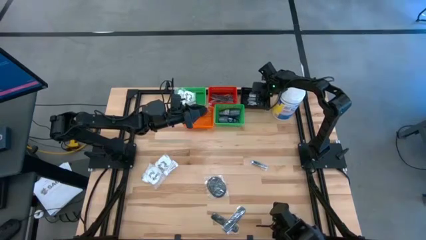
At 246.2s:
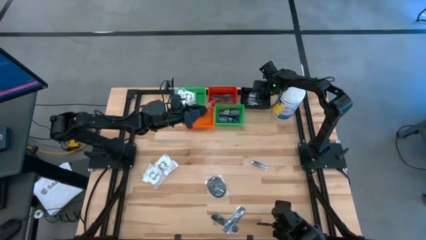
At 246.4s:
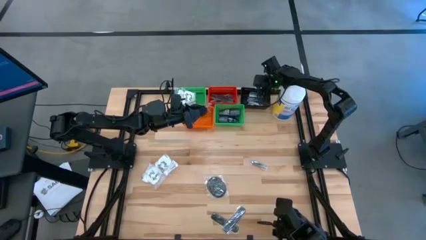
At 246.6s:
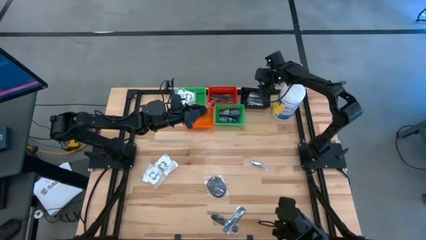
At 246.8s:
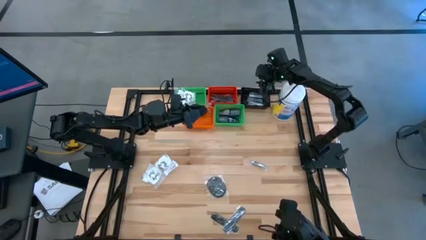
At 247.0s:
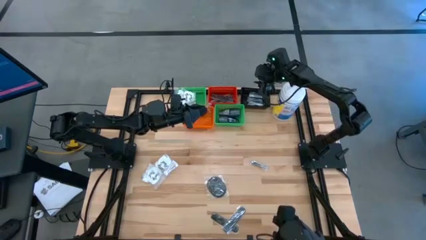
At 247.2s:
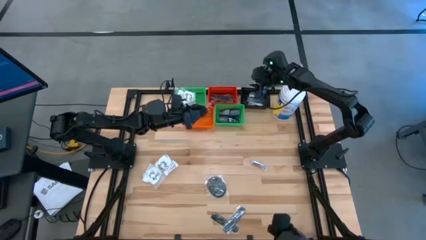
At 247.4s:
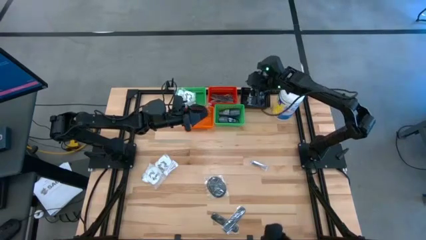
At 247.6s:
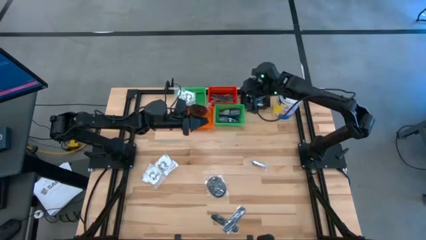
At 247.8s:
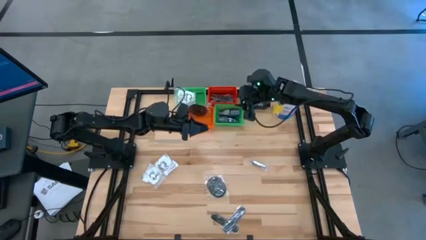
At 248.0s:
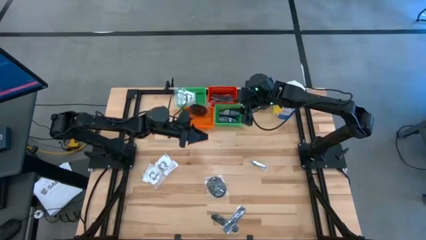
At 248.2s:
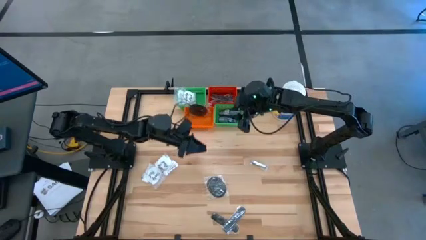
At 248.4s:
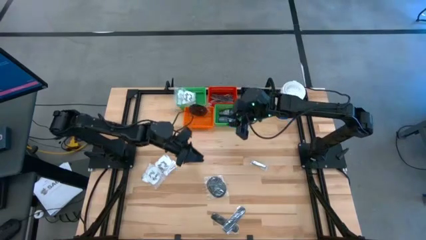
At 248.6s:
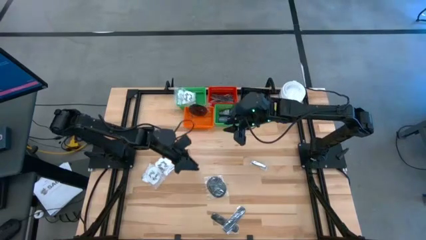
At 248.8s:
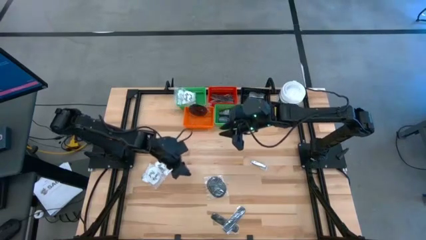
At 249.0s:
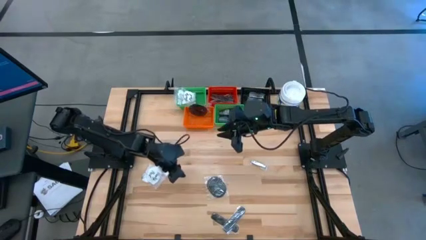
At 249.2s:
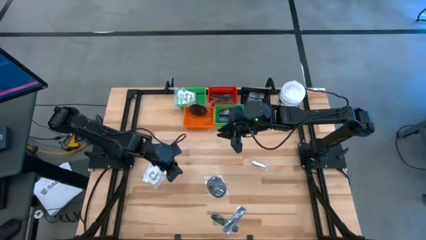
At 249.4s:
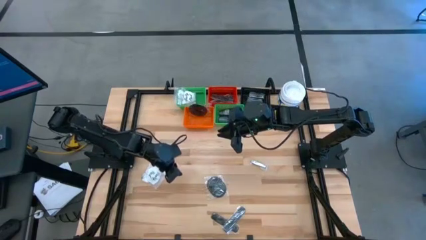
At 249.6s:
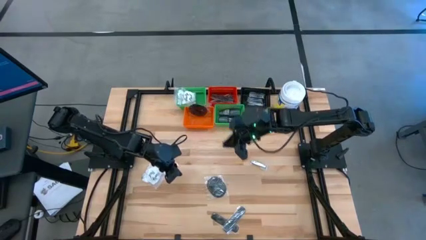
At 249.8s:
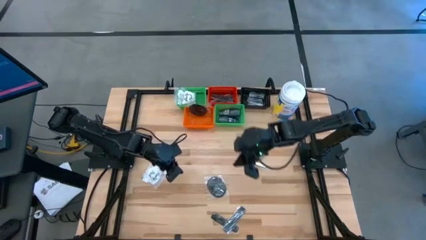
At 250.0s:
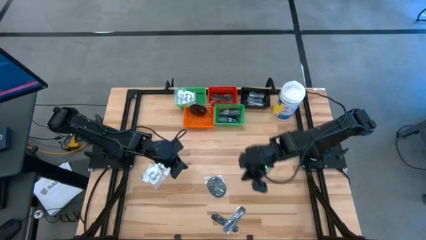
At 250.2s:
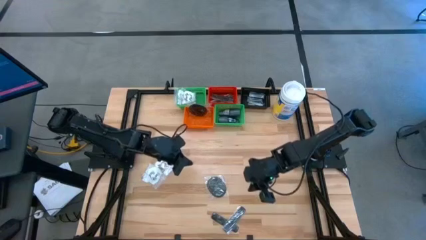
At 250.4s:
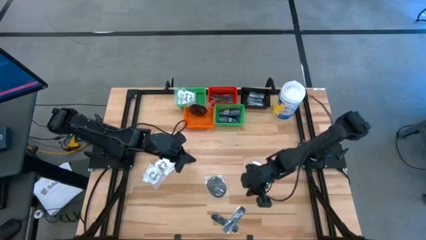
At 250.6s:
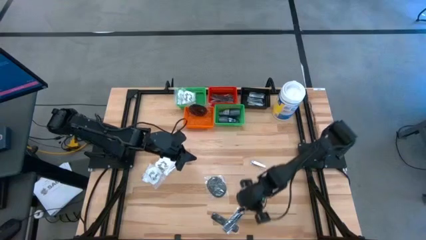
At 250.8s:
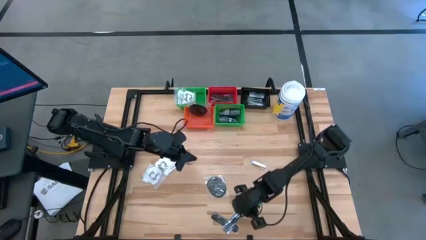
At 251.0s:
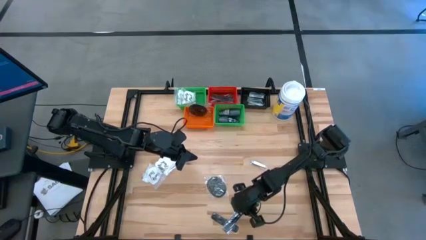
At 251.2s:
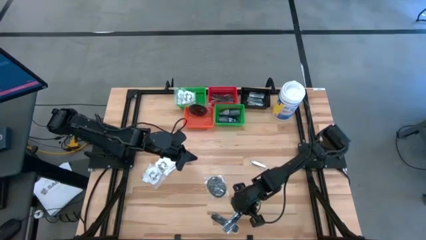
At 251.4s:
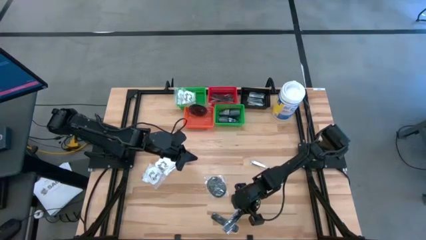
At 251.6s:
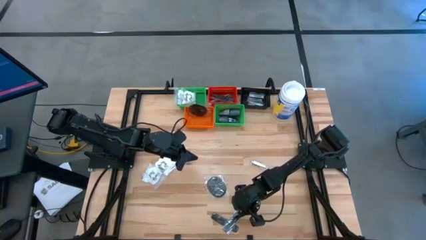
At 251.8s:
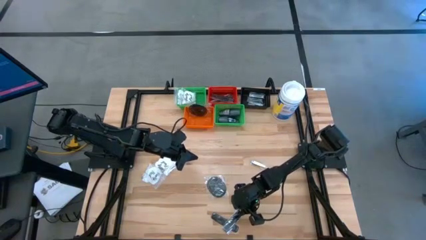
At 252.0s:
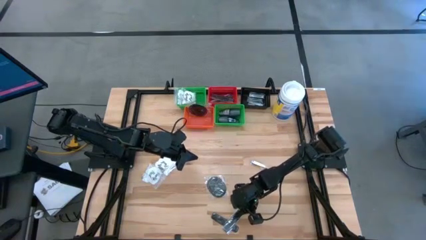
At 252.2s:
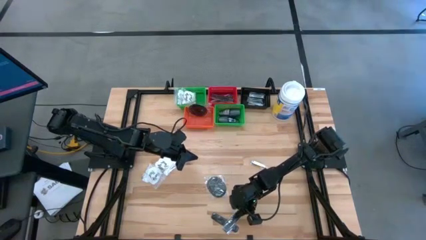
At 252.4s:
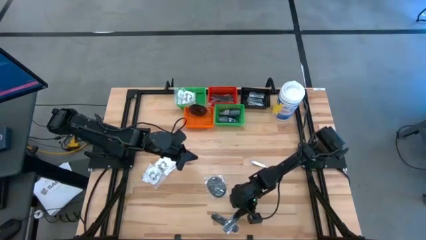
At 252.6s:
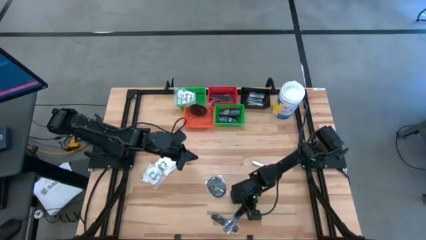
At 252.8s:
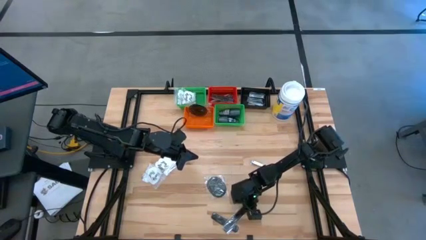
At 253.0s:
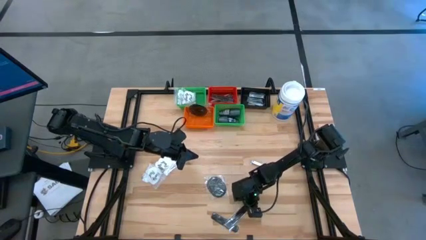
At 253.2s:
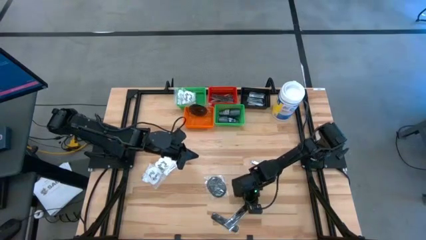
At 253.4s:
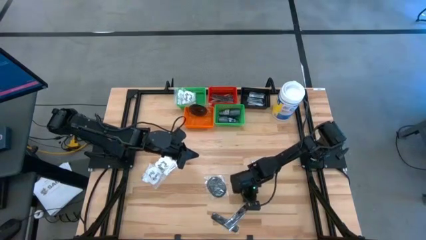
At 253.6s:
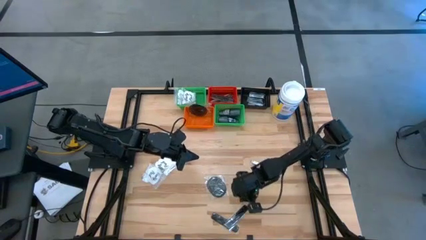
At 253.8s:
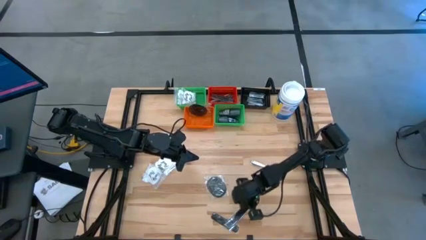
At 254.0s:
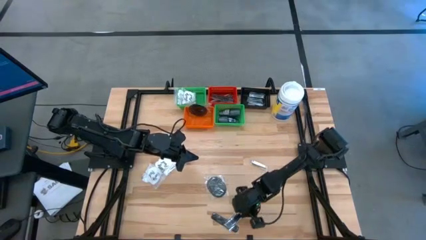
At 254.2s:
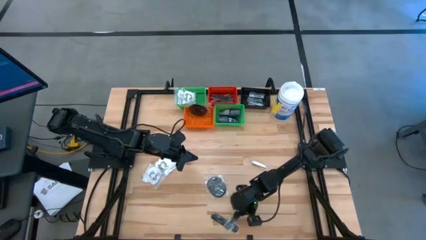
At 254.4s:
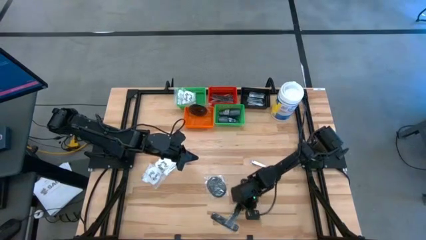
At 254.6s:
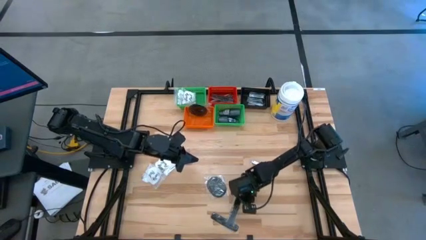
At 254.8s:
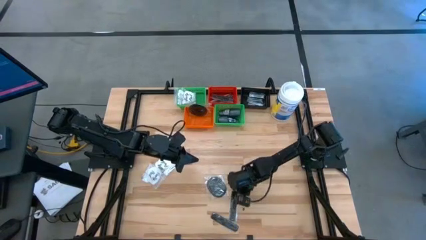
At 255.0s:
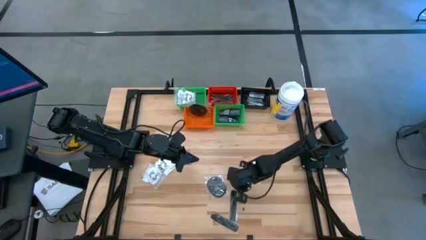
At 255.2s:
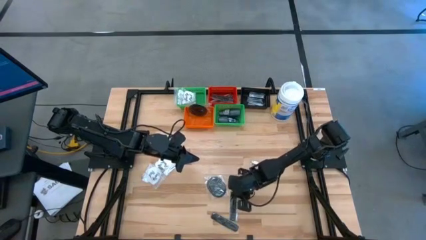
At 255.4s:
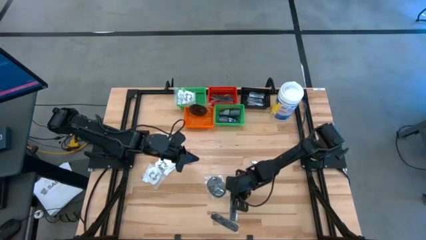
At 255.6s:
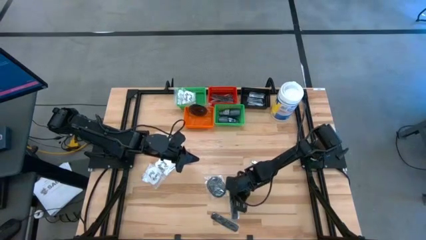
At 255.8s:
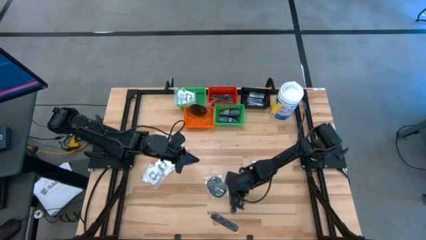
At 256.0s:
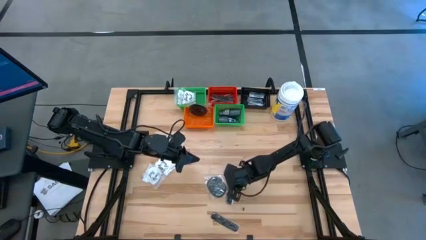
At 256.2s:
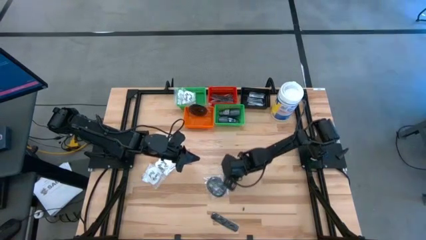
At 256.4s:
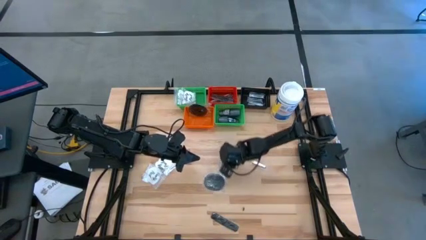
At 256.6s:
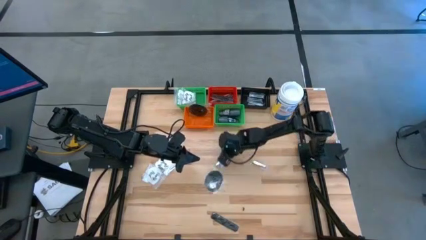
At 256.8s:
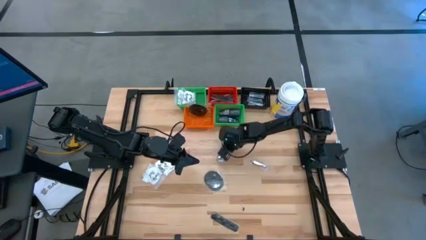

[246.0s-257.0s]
Task: Pick & Place Travel size toiletries
Adjust the black comb

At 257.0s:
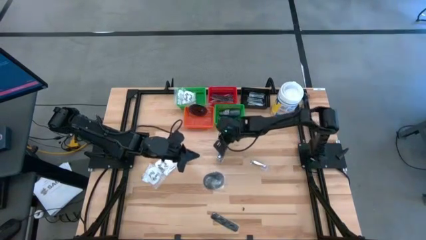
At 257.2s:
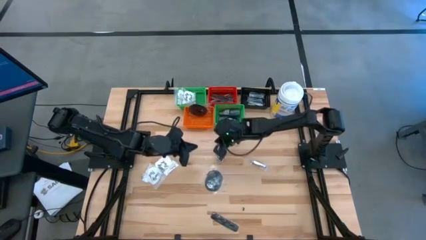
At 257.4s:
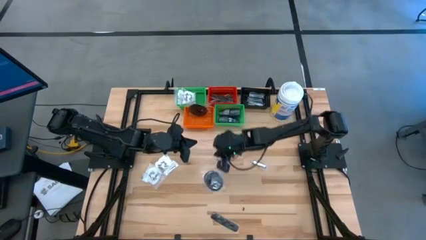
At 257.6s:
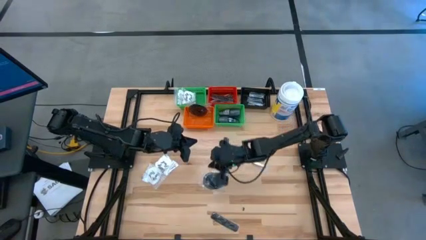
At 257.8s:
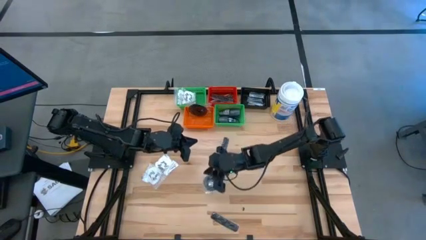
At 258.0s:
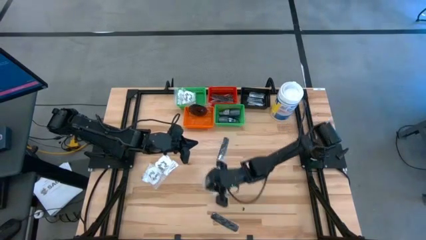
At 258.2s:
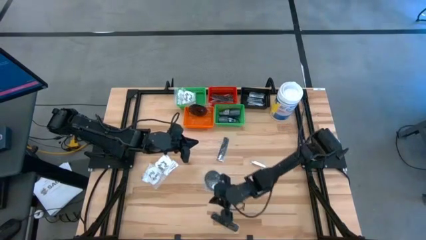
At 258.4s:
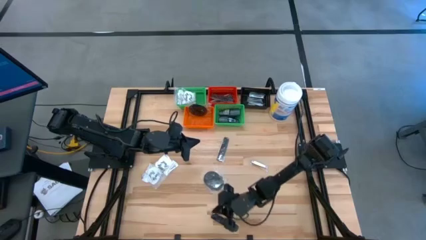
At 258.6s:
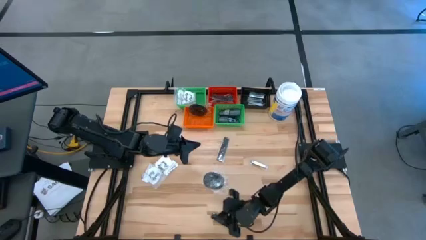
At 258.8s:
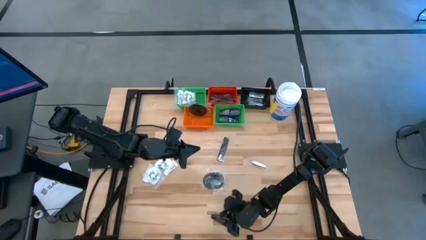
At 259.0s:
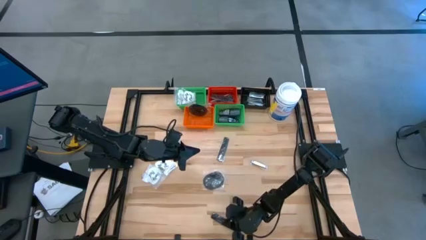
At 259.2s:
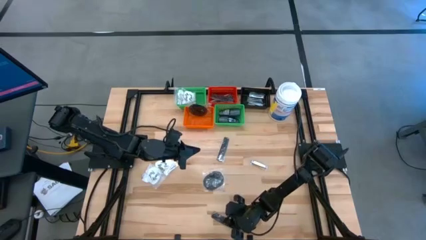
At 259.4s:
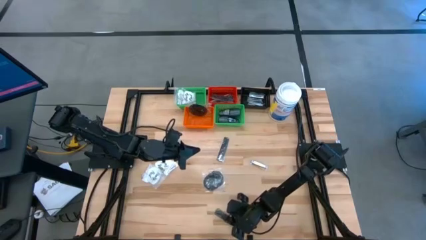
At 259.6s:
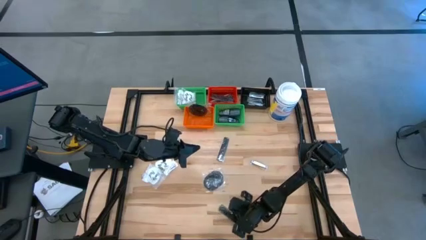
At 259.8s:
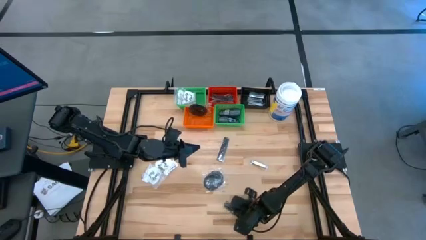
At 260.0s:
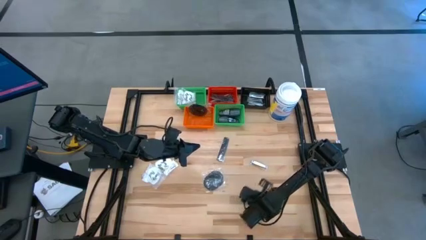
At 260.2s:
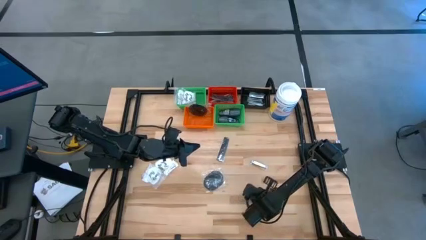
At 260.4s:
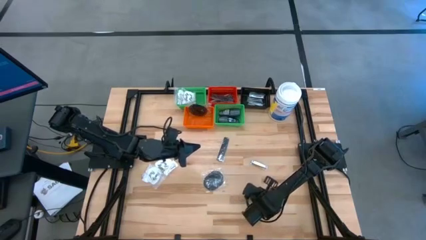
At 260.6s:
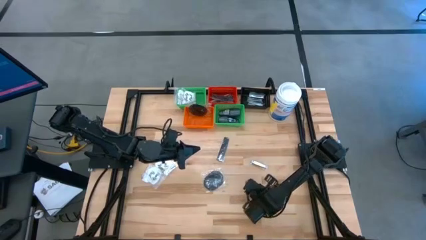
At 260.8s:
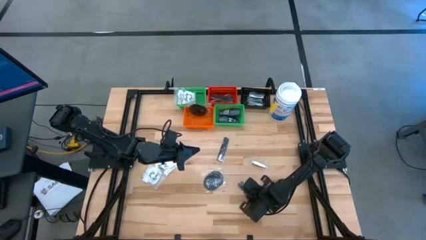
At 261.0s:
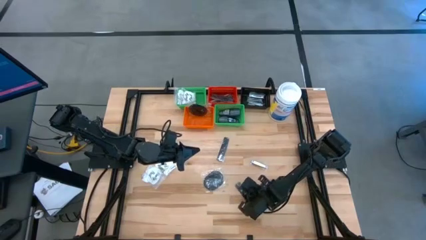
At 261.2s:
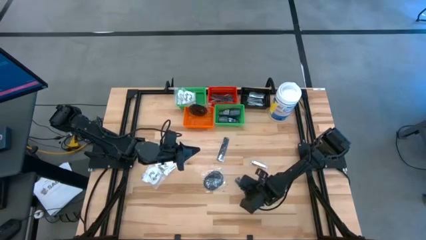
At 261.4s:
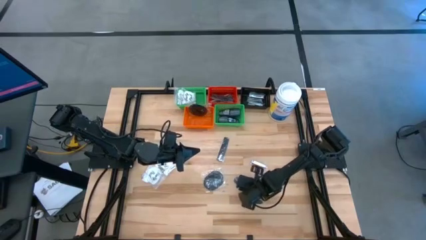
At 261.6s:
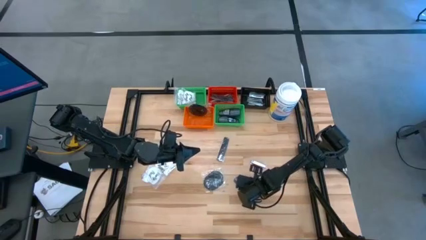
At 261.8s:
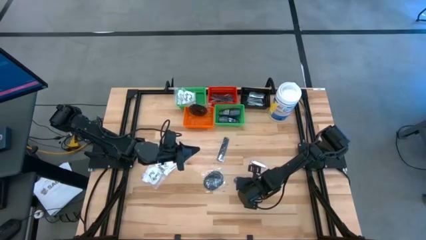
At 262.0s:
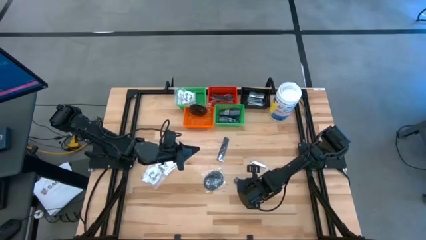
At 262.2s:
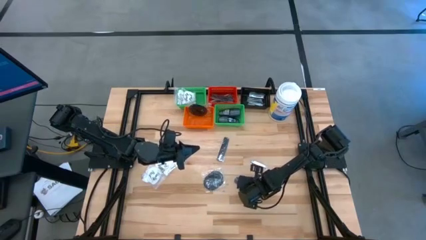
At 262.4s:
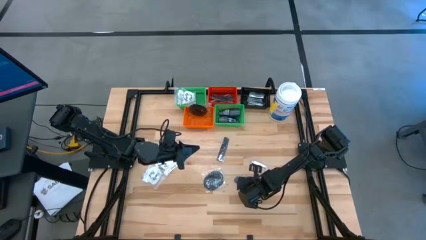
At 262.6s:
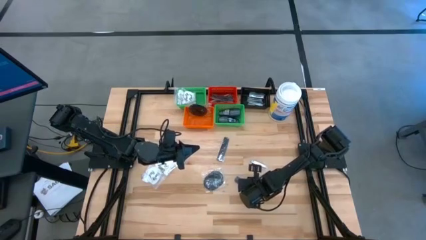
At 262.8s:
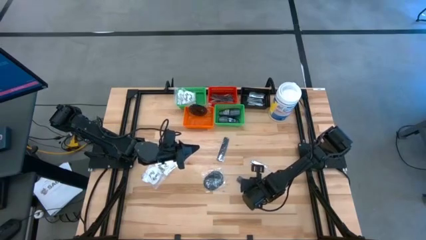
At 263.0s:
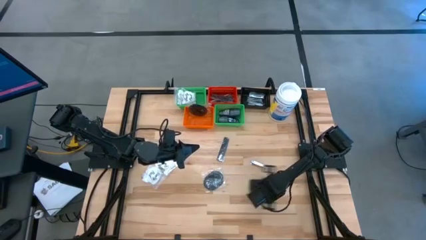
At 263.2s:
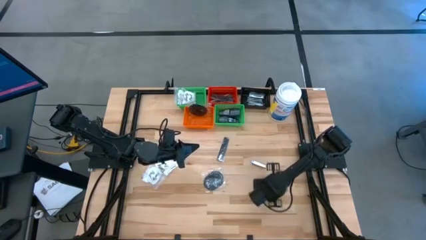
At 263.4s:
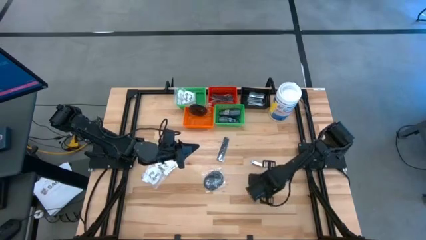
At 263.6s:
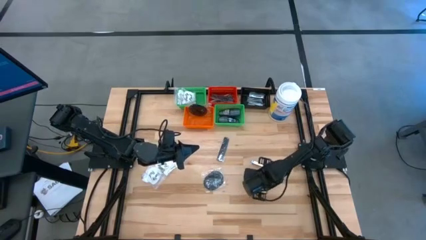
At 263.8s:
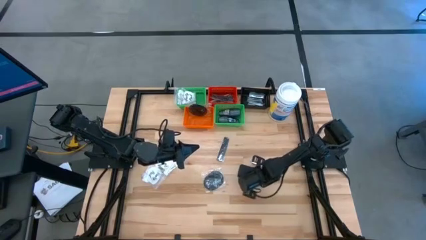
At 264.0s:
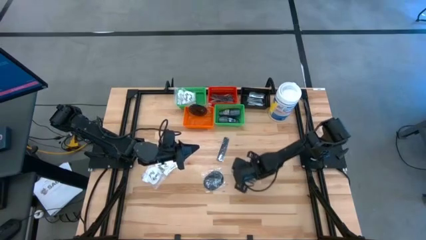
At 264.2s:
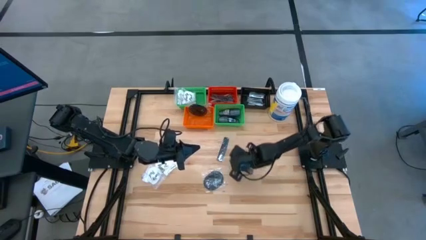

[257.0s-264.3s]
Put the black comb into the red bin
